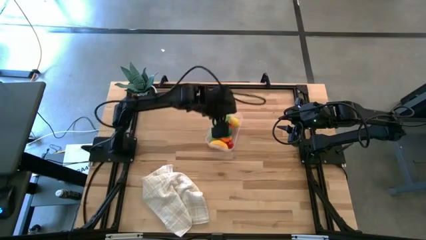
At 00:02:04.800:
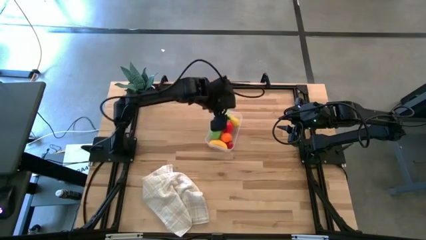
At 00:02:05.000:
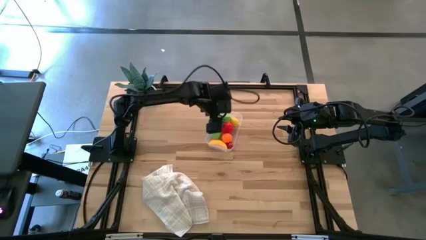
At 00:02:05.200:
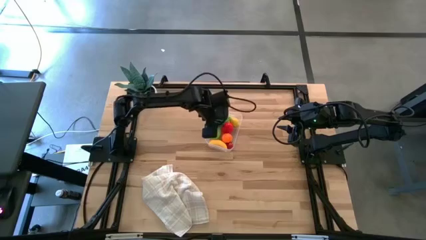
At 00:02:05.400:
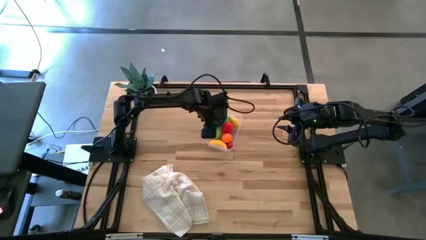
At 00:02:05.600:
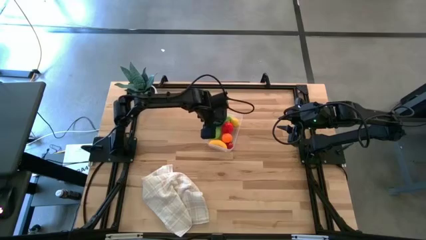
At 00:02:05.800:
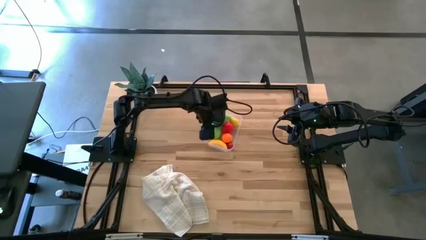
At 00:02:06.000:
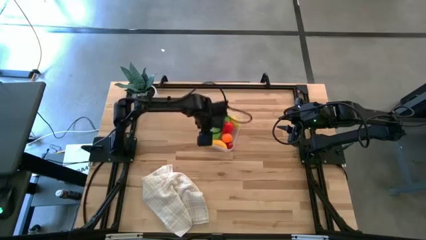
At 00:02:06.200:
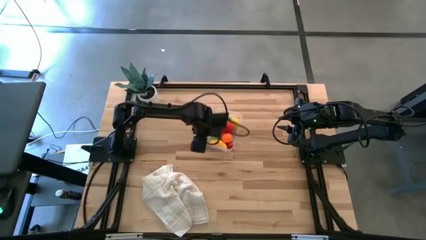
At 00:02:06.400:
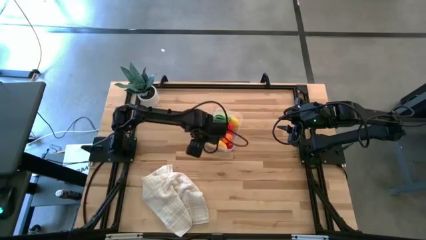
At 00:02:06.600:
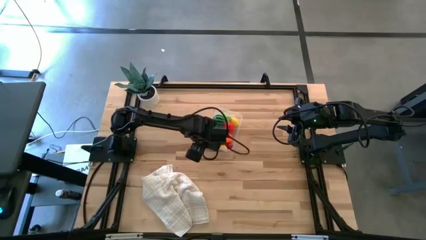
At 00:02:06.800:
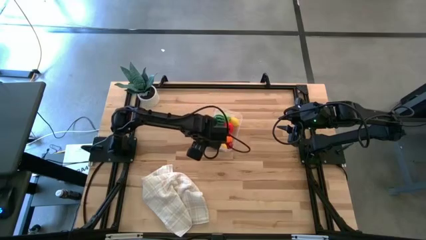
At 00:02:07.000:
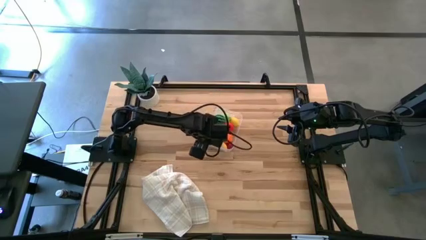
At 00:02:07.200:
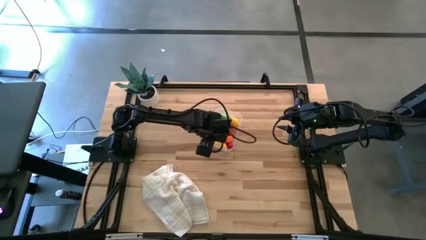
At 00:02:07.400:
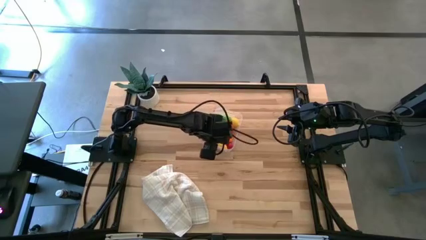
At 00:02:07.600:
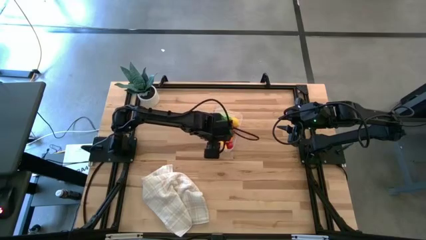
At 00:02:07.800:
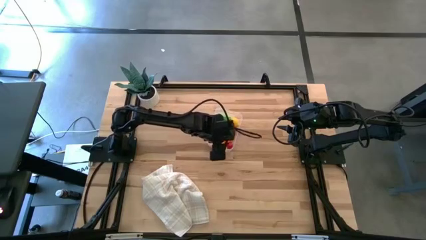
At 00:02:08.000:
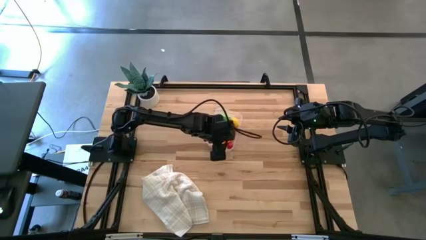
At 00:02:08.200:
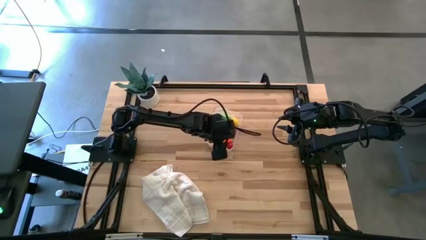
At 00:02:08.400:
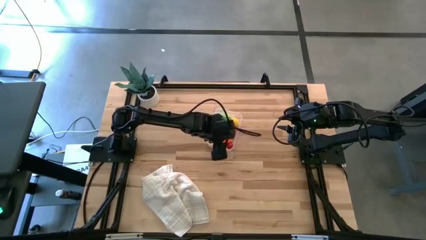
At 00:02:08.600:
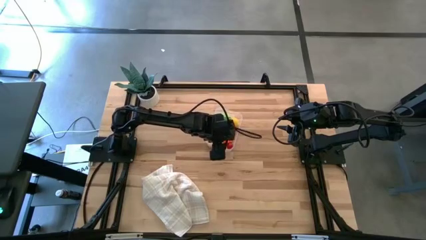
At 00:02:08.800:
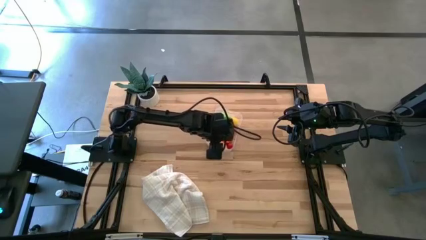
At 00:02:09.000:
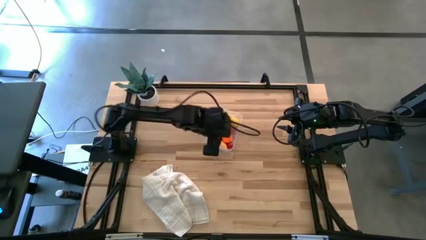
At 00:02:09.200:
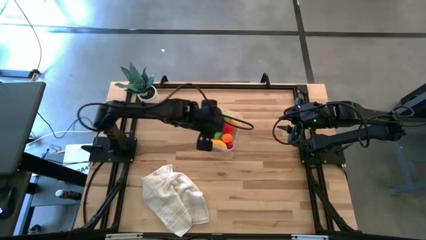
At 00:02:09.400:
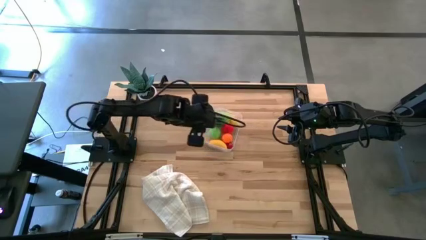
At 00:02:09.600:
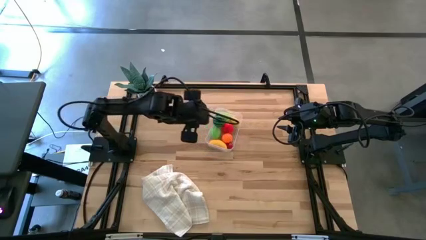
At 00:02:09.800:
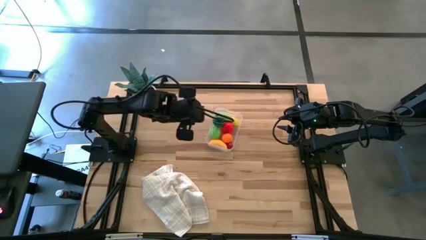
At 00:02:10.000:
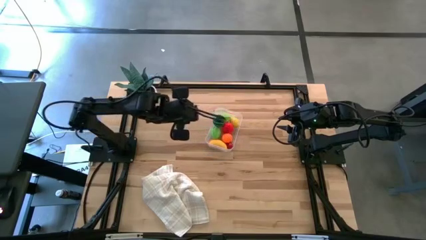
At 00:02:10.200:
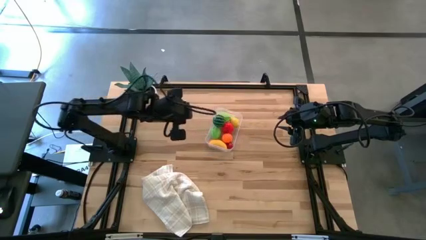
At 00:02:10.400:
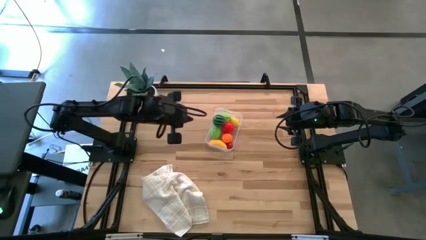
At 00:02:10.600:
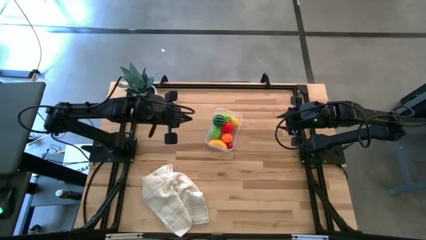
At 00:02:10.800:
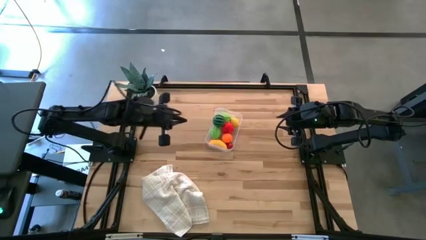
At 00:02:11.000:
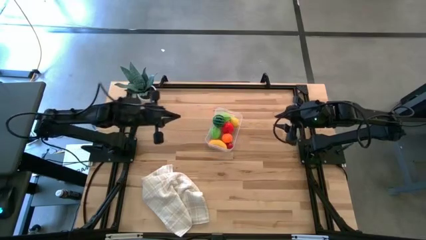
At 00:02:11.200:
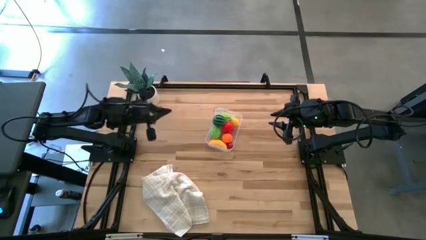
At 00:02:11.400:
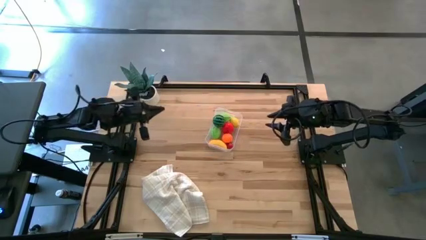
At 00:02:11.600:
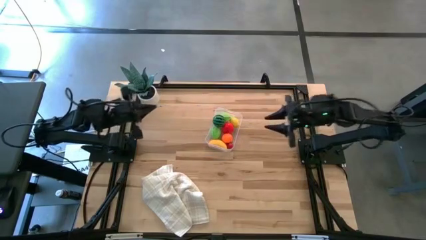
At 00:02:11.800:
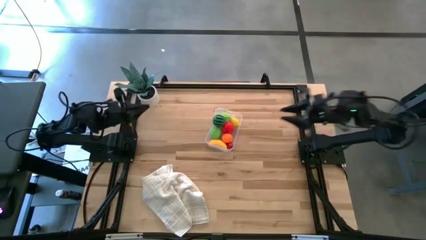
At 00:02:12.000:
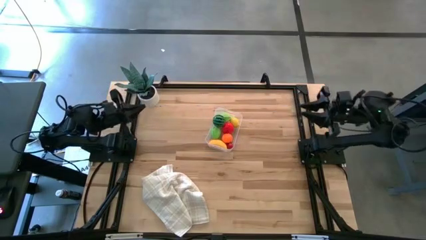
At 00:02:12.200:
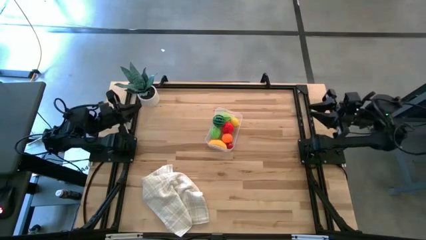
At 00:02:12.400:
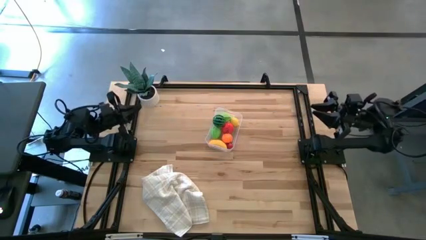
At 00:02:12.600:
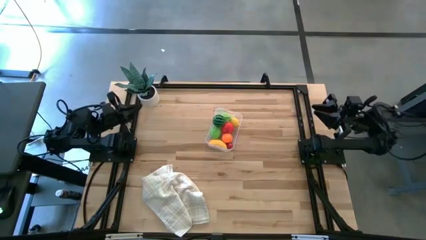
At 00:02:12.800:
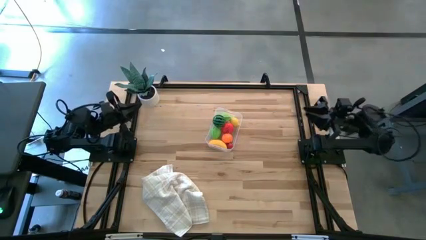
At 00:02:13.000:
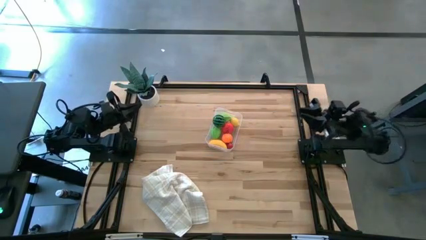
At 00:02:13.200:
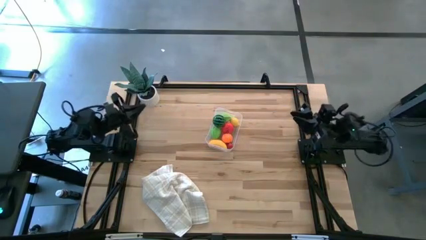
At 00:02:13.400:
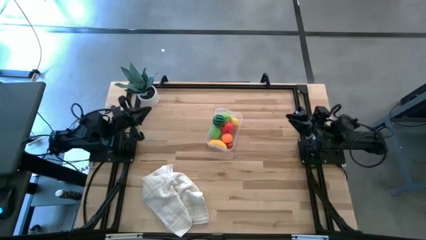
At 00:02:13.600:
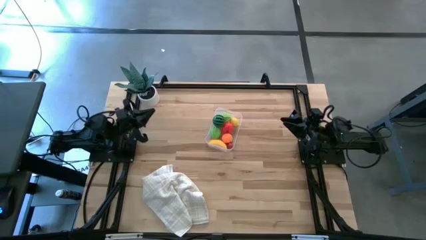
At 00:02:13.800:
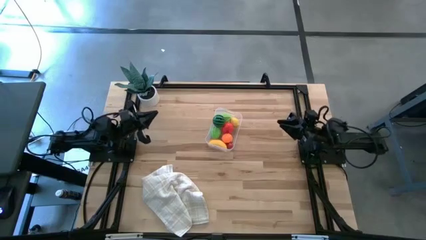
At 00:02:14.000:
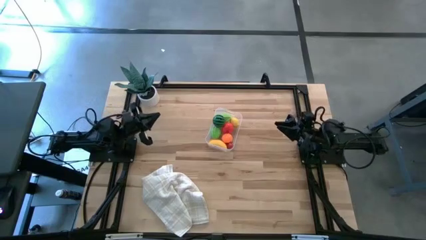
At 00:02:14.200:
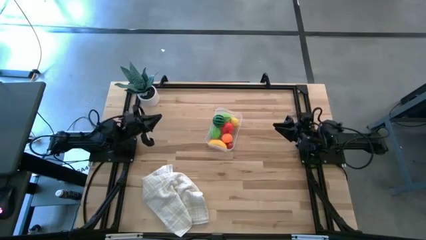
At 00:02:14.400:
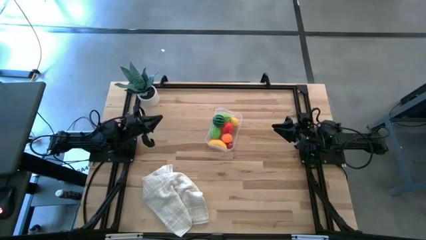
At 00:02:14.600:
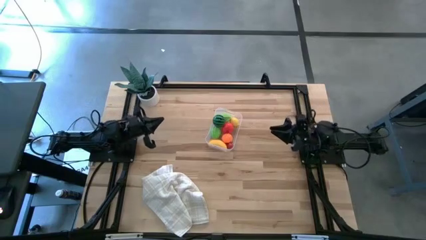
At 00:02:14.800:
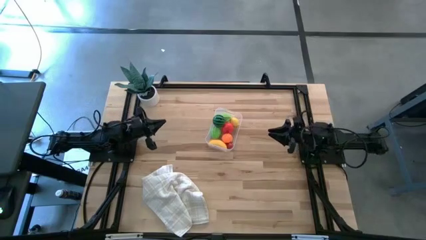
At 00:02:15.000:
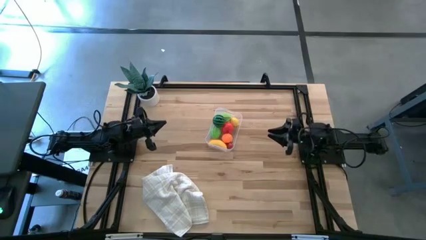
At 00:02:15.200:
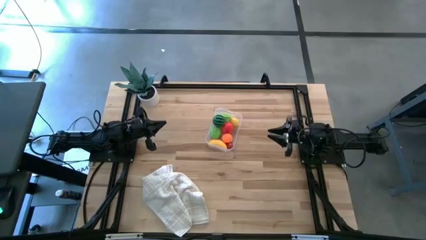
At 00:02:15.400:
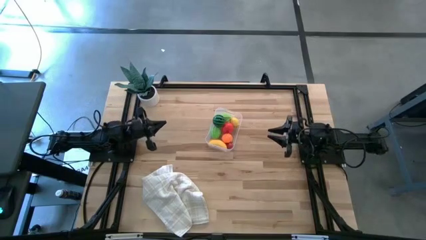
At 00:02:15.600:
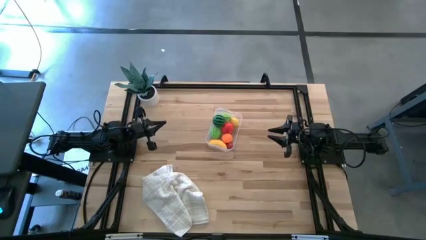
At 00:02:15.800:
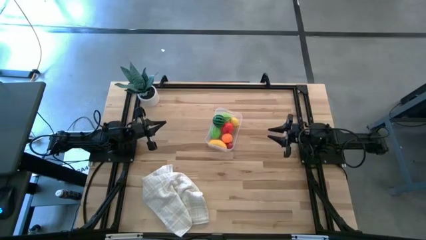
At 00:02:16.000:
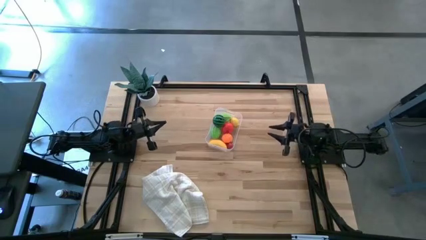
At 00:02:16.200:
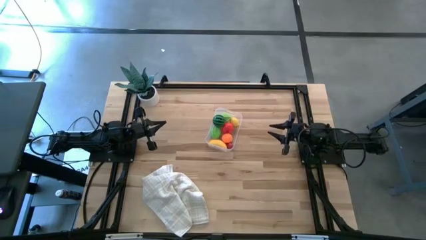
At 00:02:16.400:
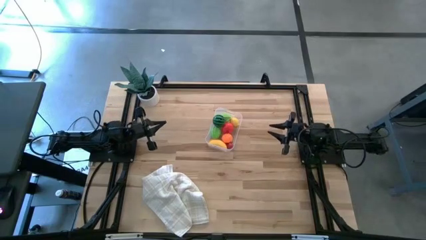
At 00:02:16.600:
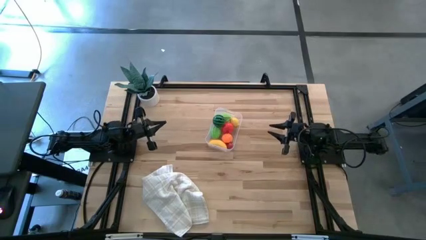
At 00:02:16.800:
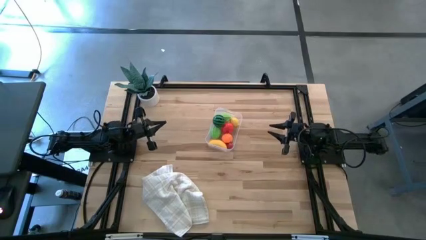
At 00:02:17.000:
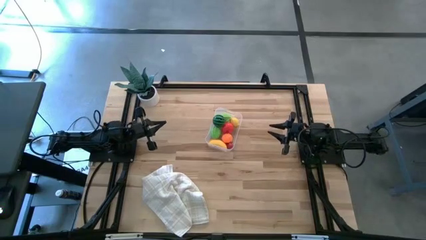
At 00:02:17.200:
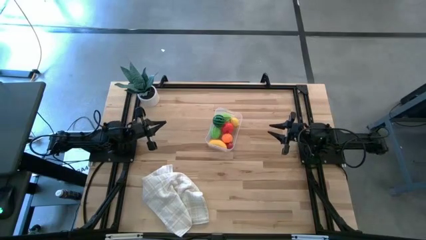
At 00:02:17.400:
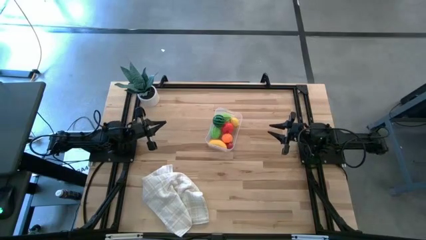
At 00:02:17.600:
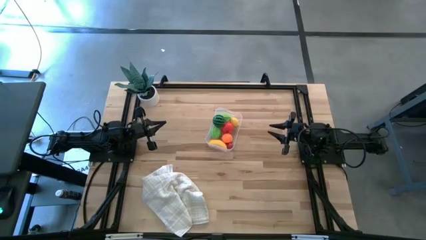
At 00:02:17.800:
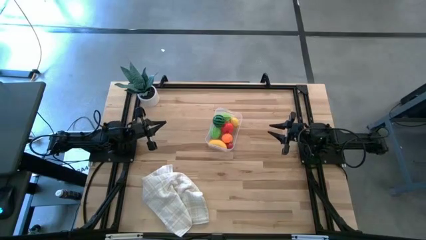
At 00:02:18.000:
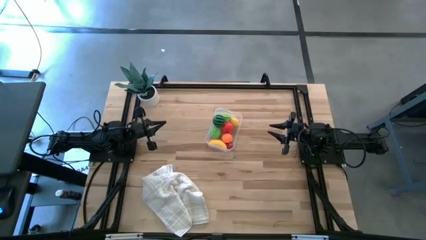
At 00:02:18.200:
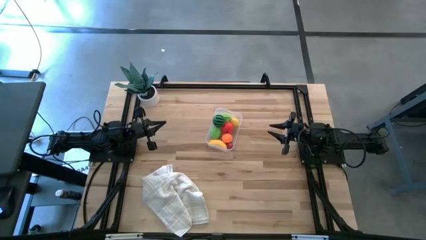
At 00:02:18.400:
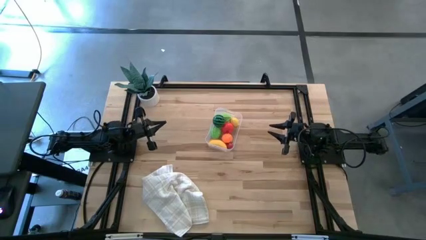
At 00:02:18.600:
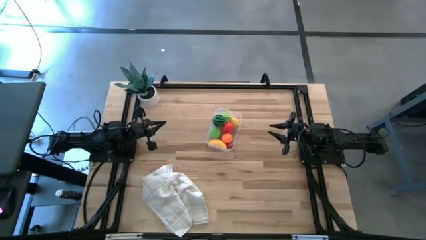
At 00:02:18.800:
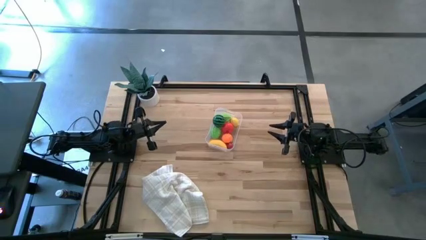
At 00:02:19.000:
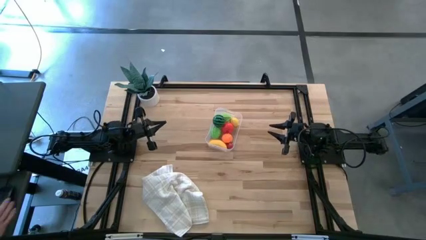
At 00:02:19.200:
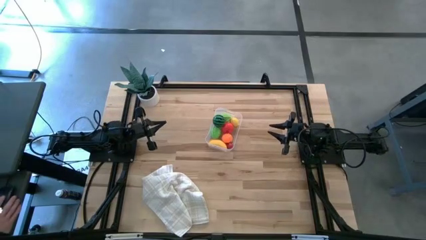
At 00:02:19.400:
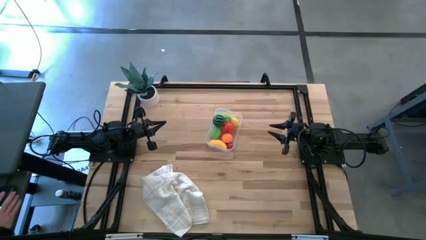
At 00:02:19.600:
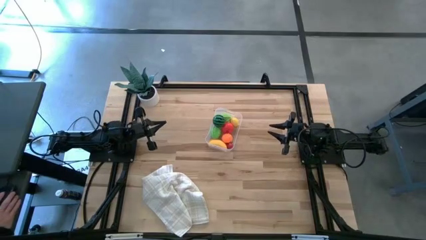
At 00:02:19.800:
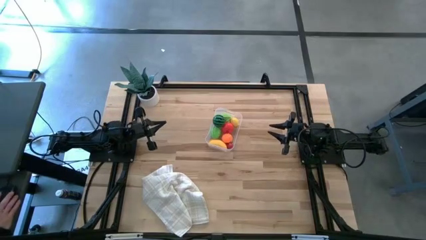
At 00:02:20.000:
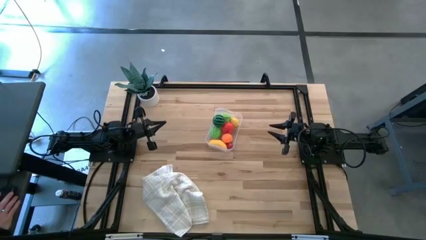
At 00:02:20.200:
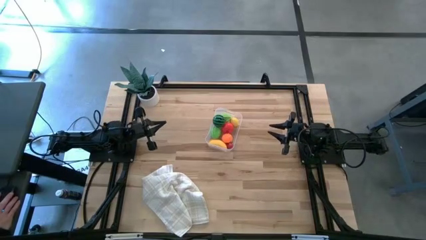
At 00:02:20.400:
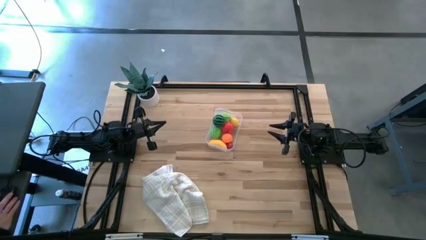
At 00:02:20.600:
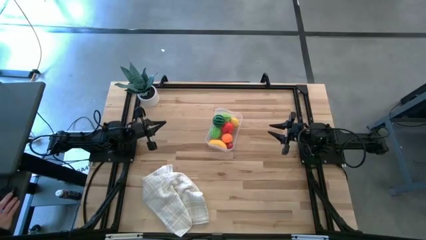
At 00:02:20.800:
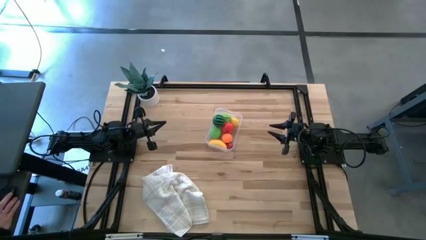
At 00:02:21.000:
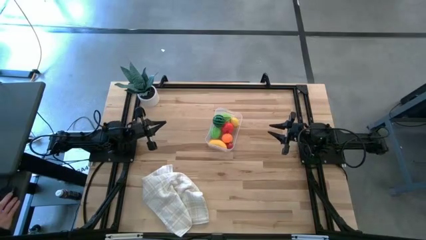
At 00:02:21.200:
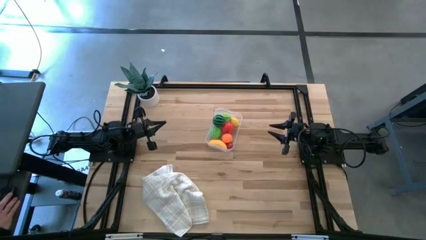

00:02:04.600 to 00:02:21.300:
Task: Pick and placing Produce into tupperware
Return to Home Position
